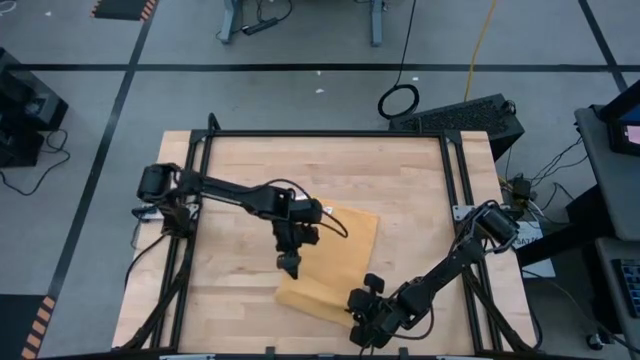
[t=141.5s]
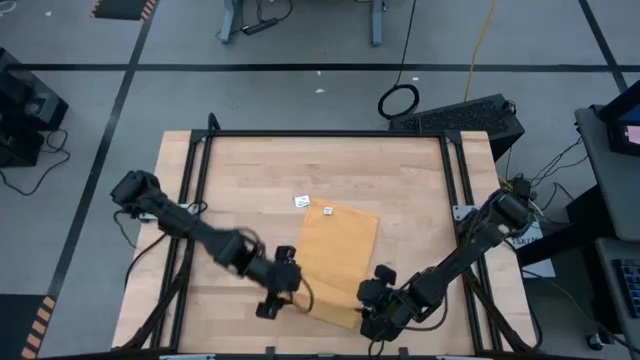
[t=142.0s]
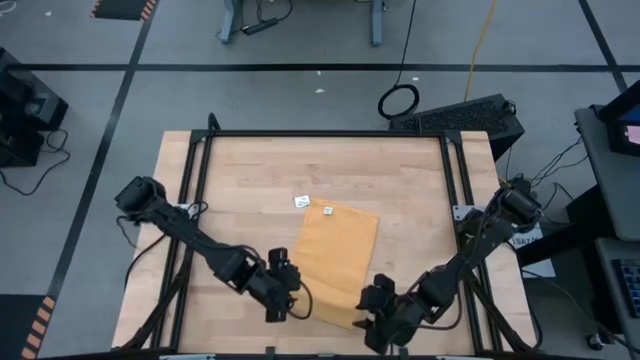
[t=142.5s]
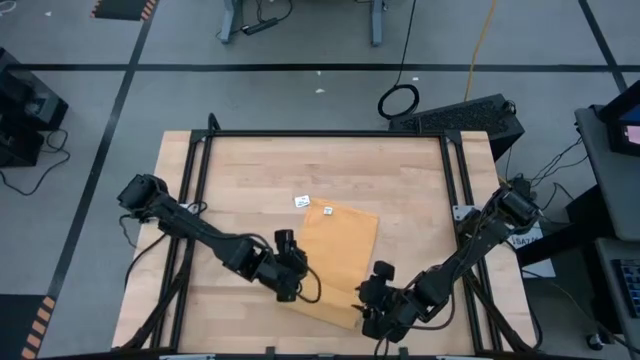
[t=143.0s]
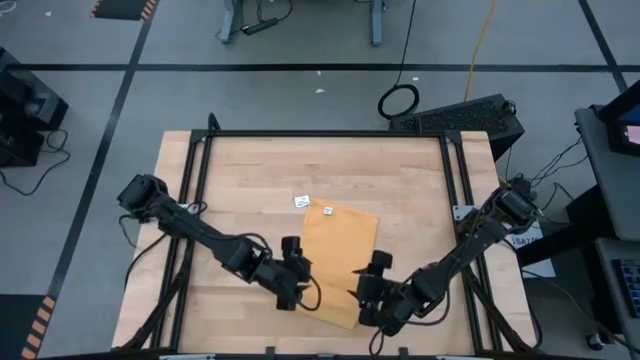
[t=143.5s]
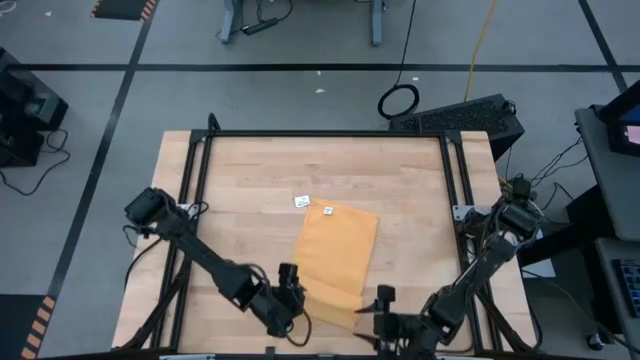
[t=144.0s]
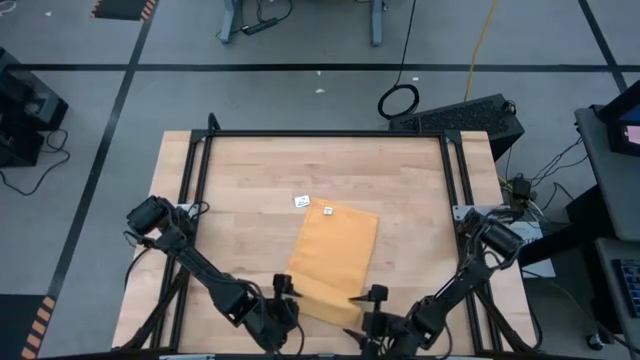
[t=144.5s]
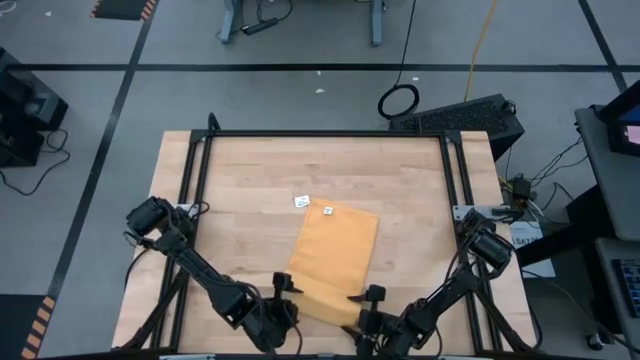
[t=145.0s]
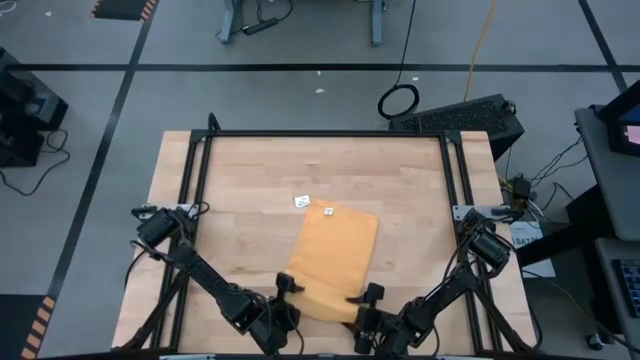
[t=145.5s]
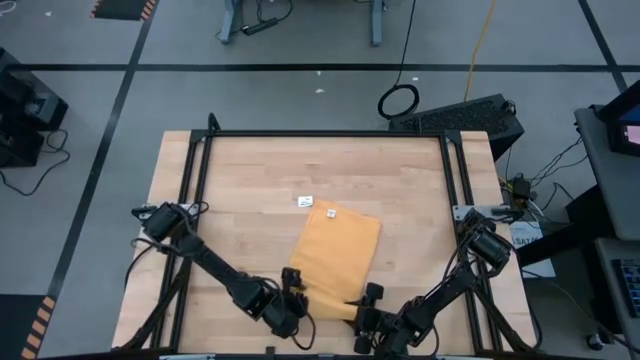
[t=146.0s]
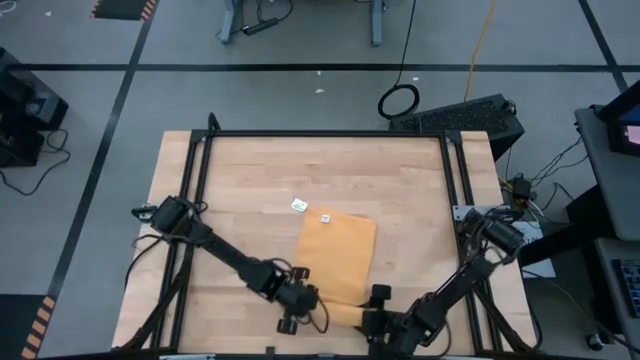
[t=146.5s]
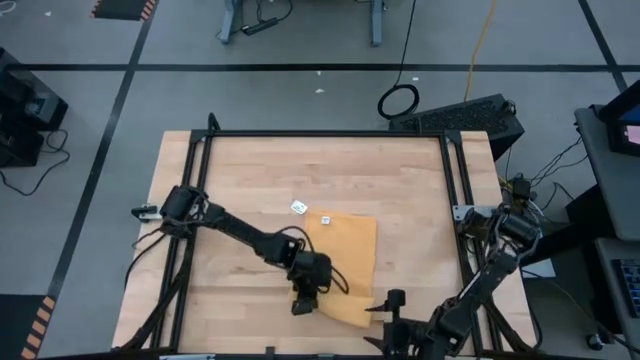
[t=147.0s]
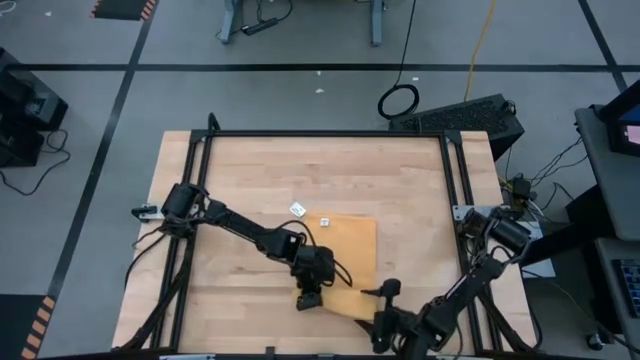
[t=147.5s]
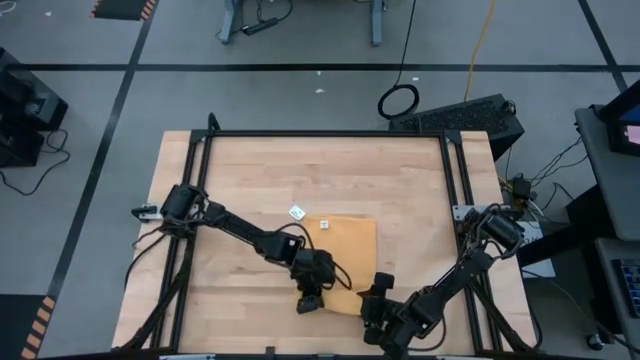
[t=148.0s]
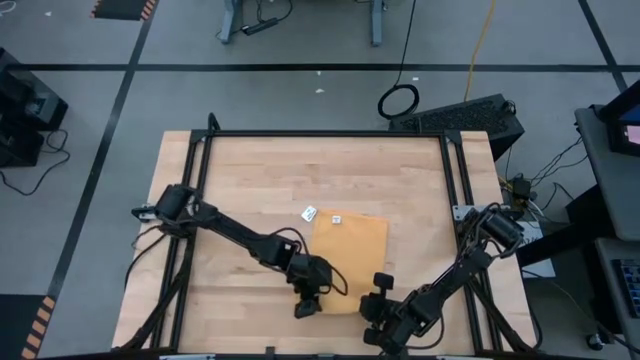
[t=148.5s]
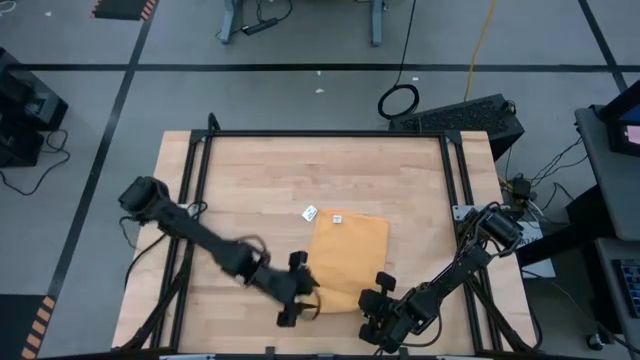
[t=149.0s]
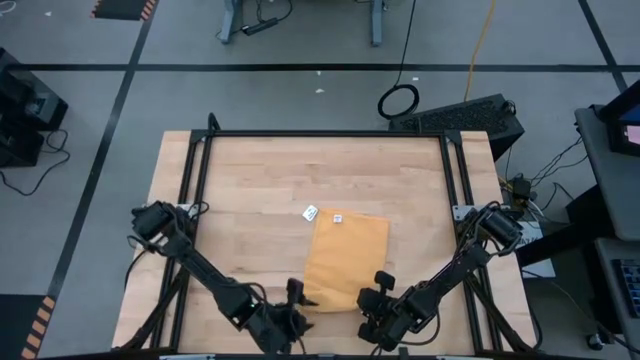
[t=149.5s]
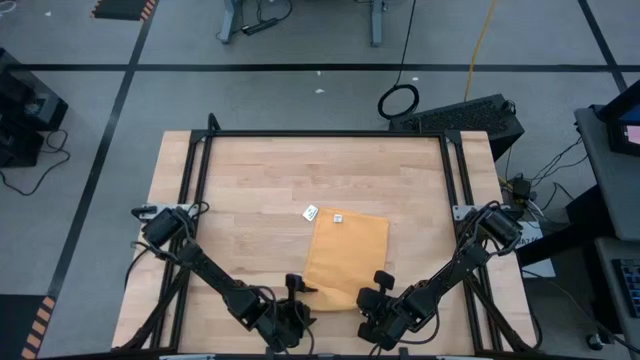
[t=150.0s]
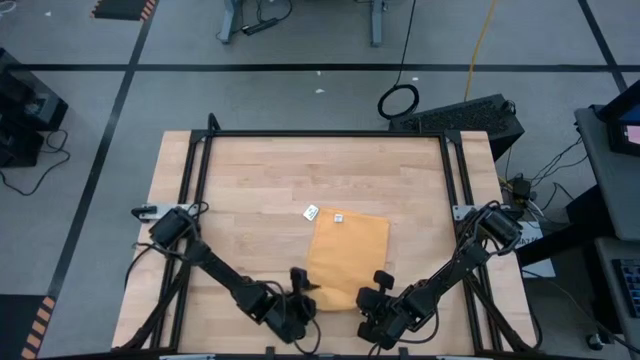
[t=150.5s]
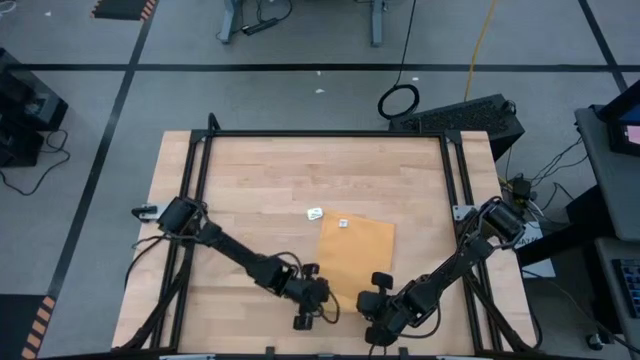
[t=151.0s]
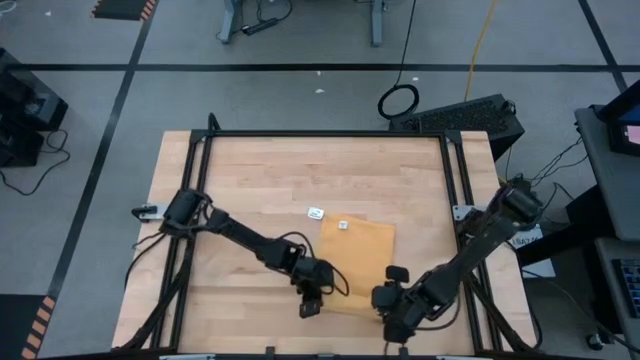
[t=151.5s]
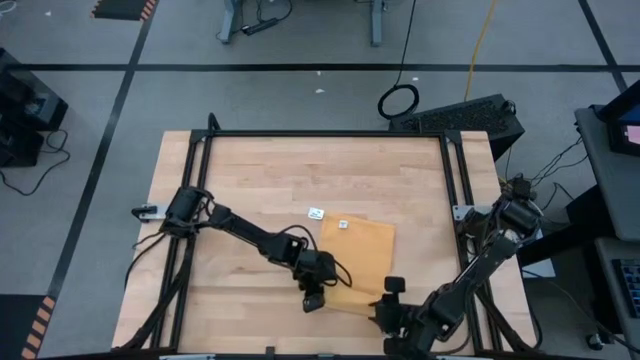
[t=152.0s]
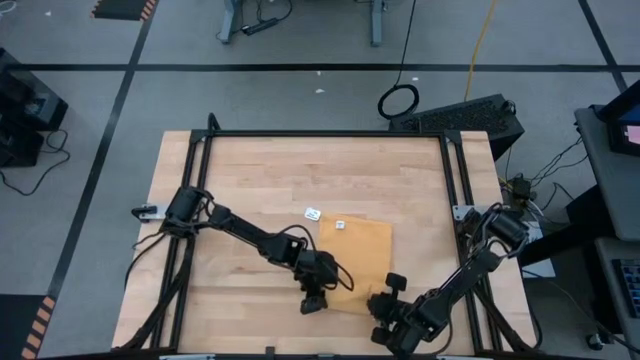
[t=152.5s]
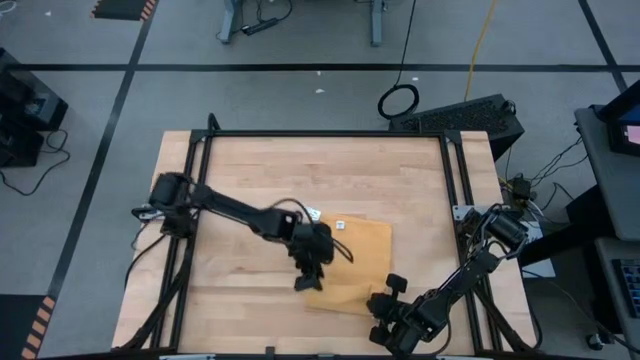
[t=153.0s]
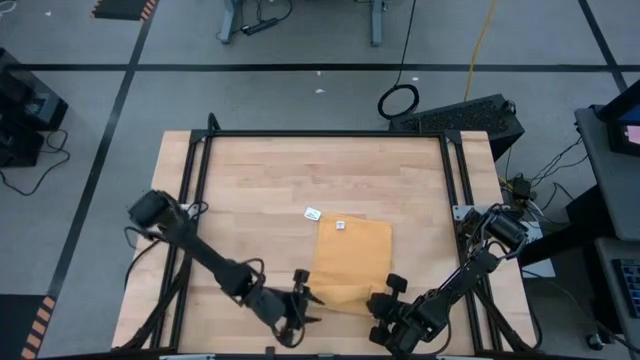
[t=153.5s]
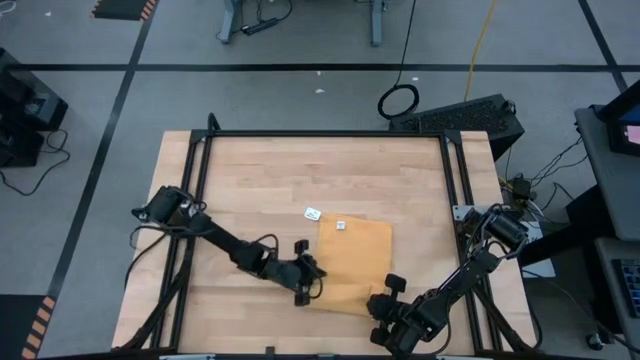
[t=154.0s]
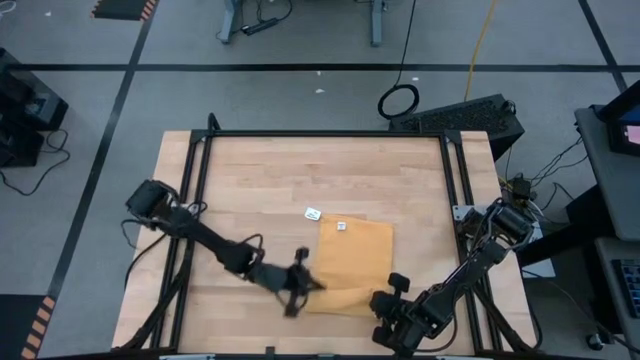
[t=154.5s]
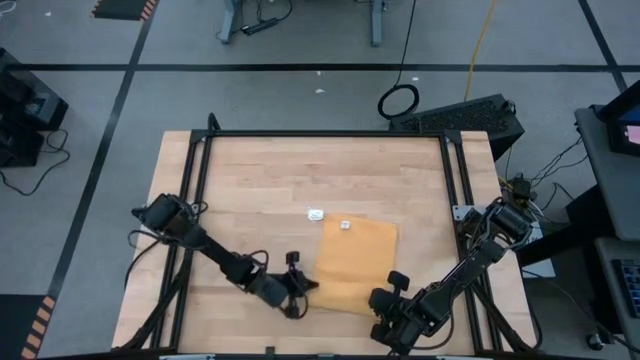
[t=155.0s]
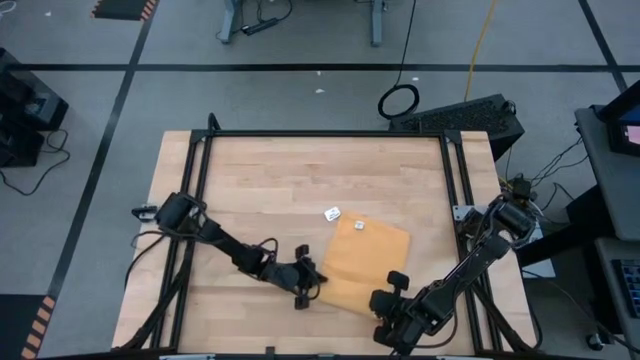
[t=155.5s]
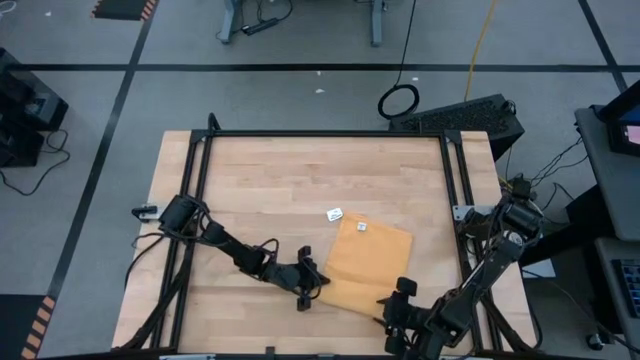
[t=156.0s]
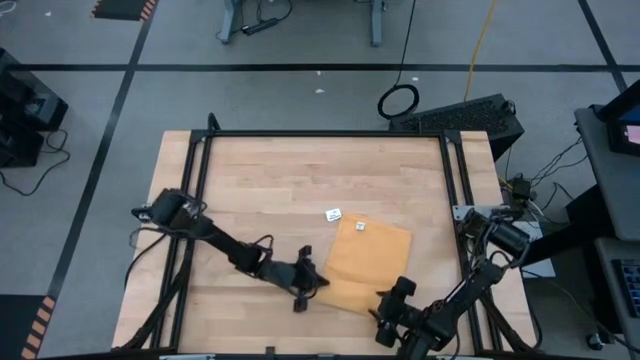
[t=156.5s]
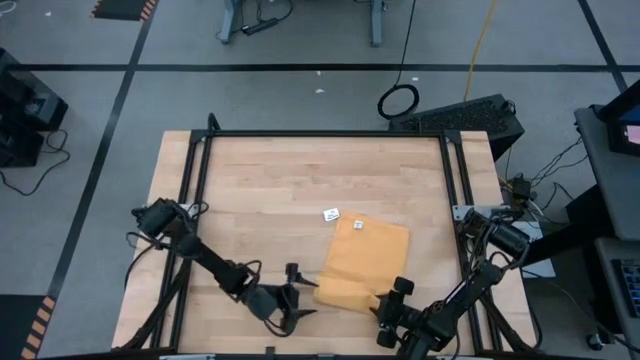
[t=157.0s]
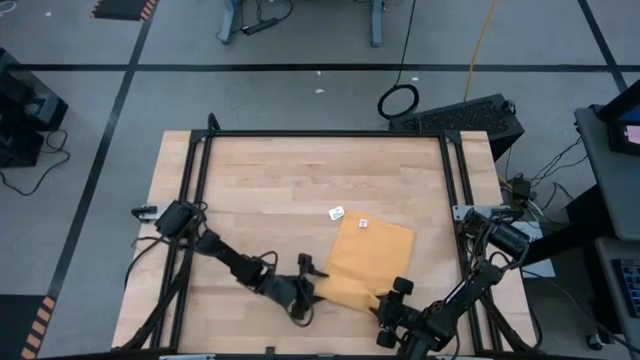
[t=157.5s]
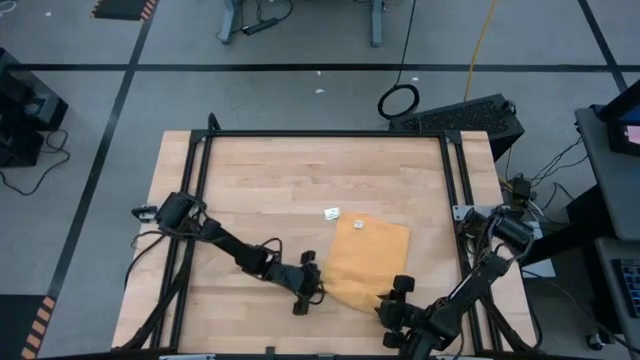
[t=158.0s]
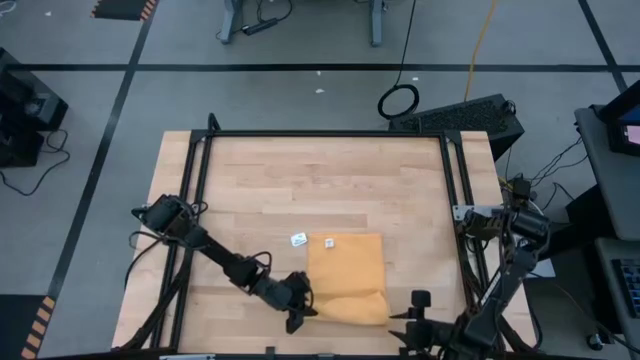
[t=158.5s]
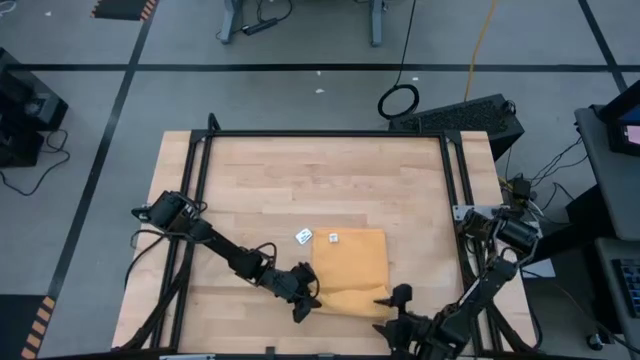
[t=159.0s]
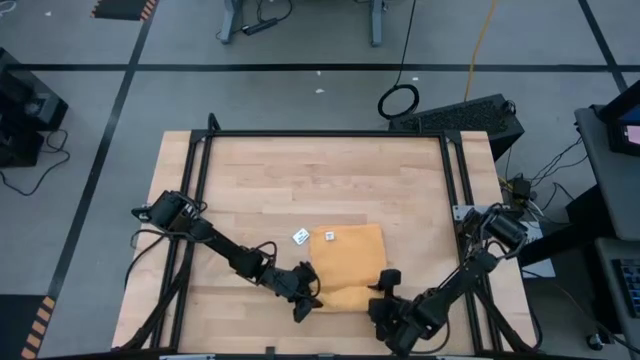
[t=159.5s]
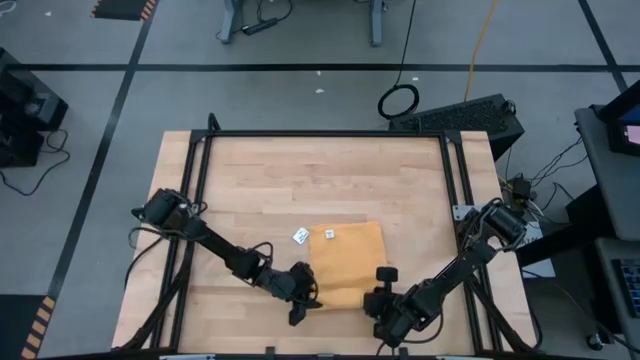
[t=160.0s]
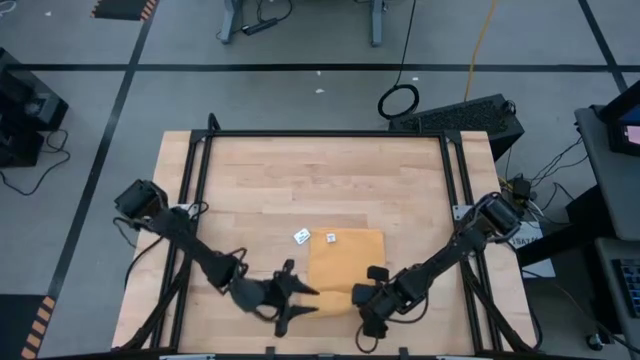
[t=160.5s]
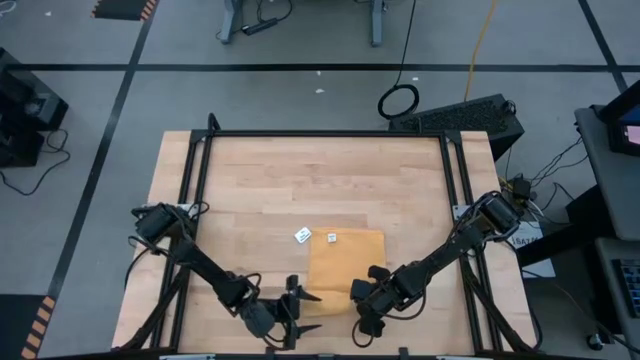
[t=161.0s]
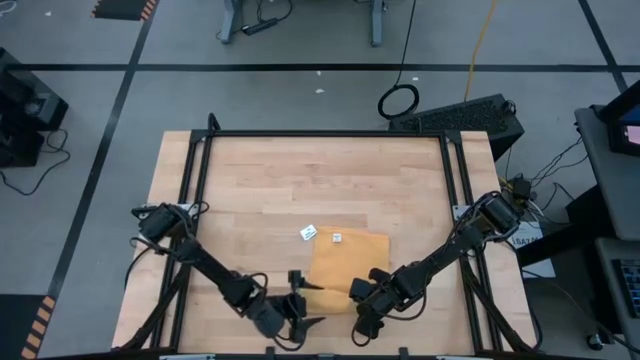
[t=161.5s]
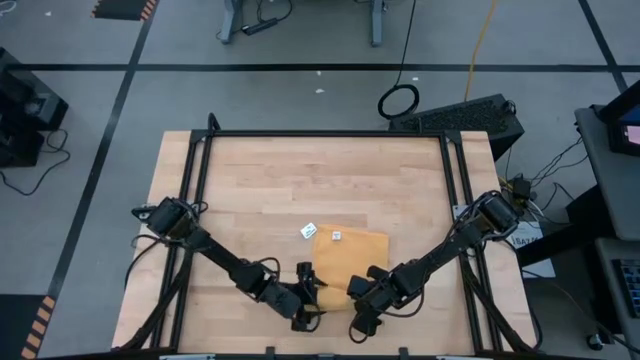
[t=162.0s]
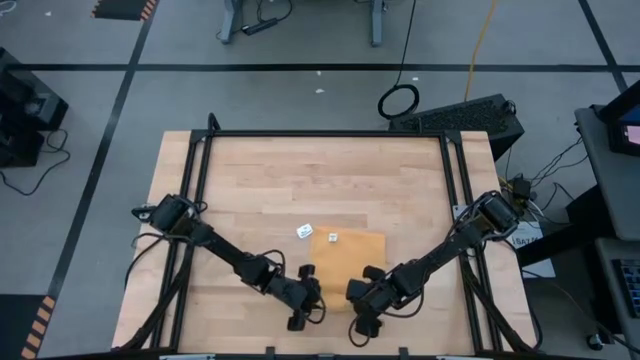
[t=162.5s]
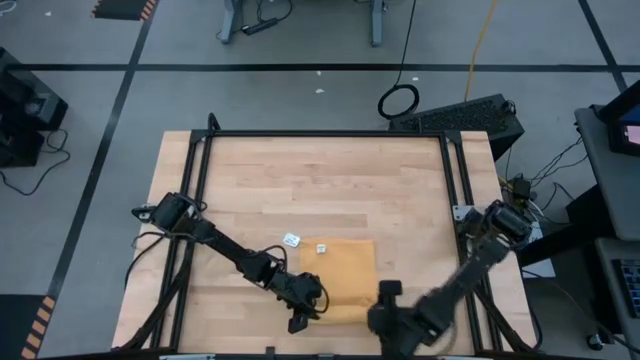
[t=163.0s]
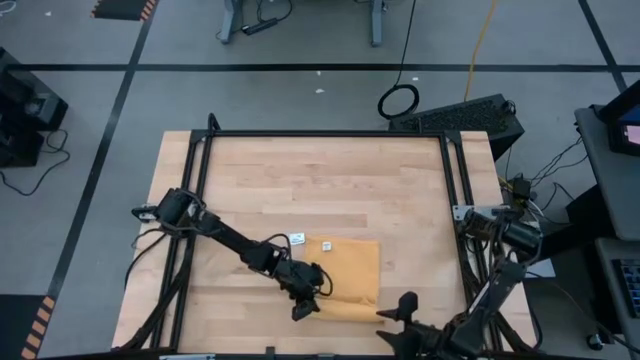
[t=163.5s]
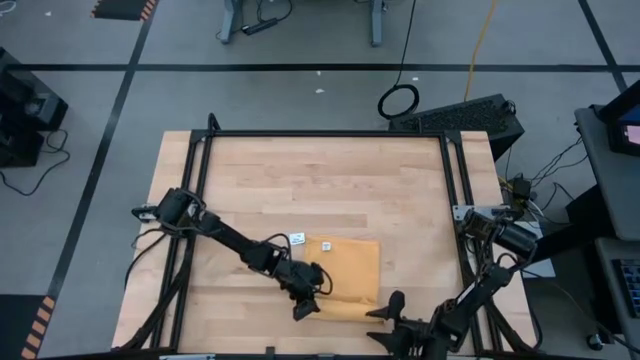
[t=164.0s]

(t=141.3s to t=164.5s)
Task: Roll towel into tight, uniform cylinder
Roll the orange towel
